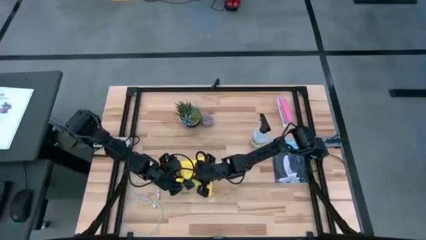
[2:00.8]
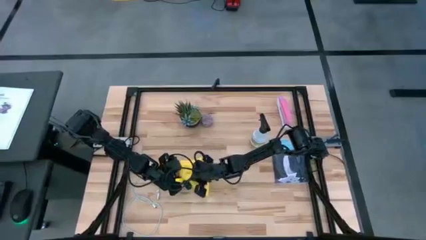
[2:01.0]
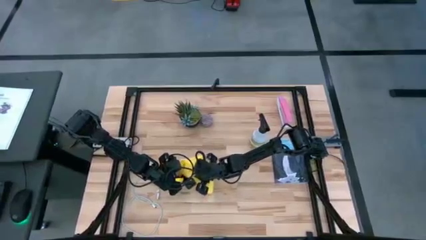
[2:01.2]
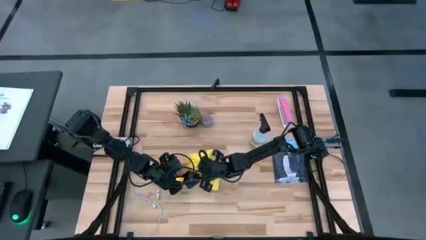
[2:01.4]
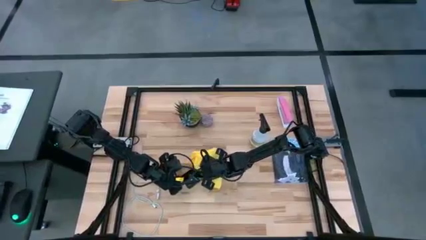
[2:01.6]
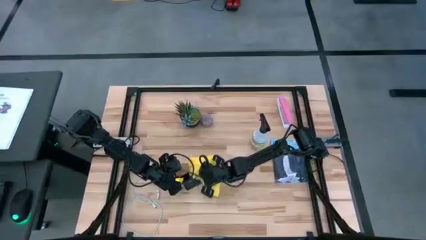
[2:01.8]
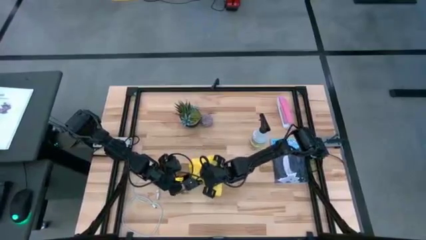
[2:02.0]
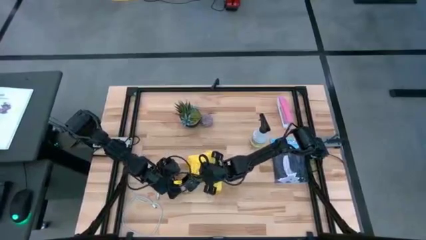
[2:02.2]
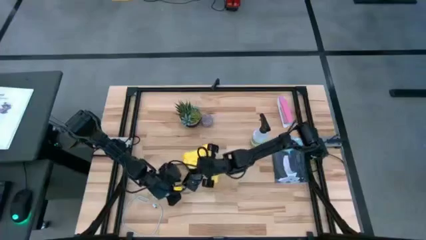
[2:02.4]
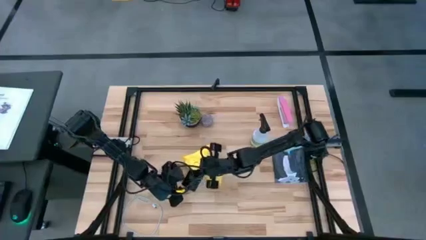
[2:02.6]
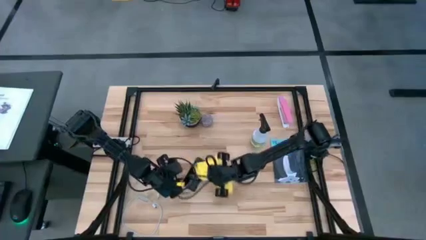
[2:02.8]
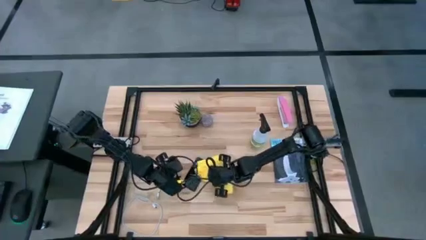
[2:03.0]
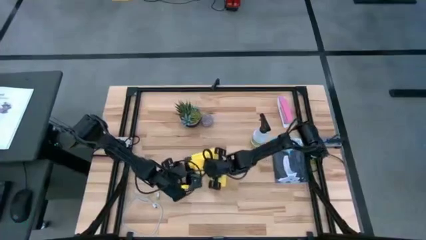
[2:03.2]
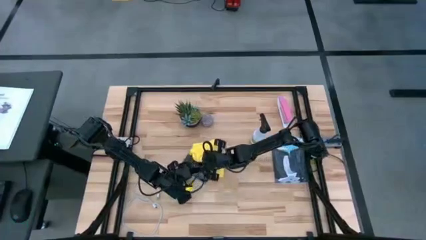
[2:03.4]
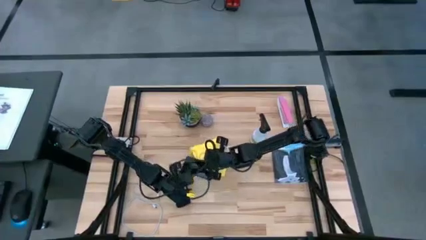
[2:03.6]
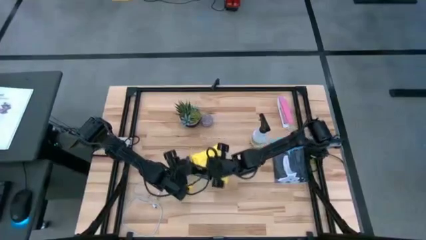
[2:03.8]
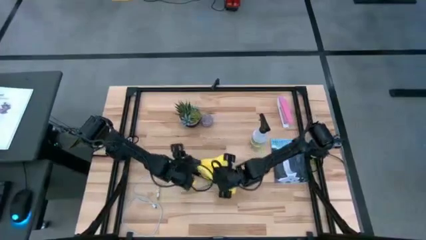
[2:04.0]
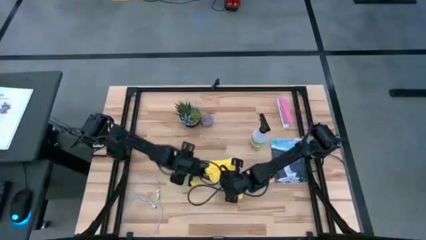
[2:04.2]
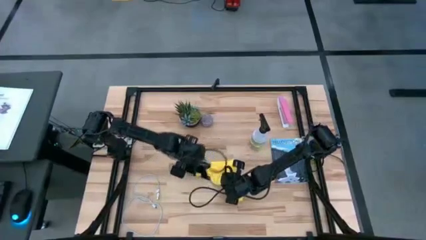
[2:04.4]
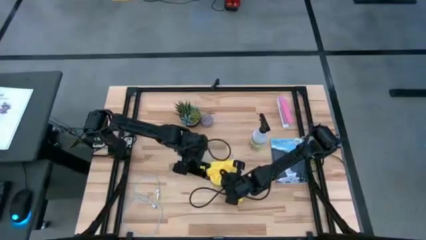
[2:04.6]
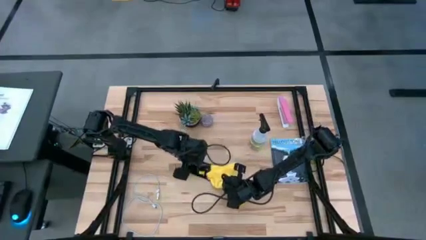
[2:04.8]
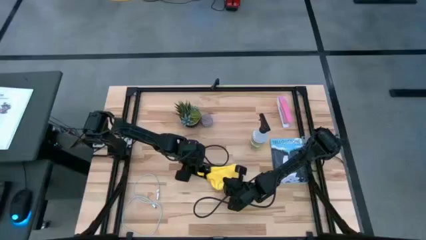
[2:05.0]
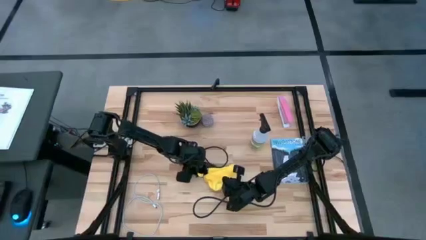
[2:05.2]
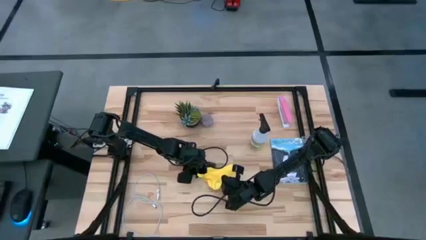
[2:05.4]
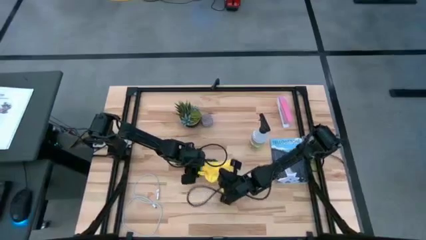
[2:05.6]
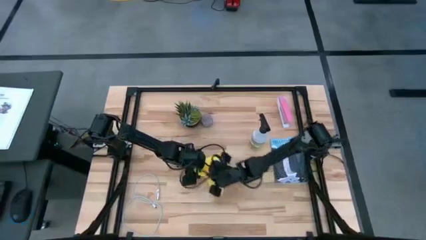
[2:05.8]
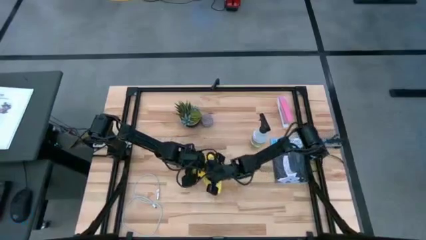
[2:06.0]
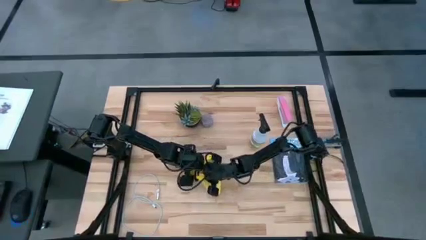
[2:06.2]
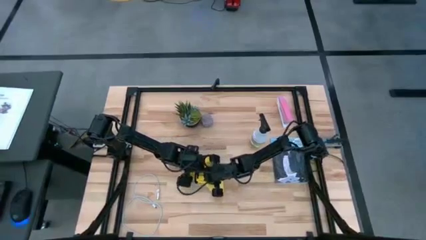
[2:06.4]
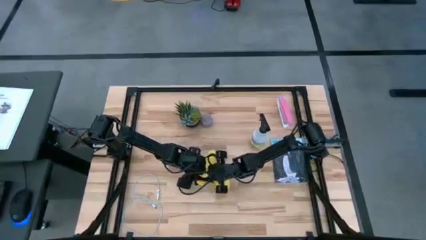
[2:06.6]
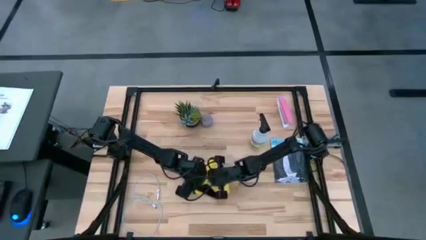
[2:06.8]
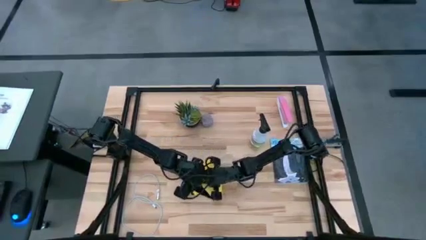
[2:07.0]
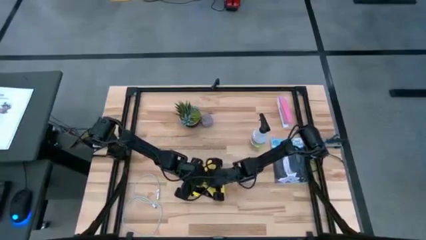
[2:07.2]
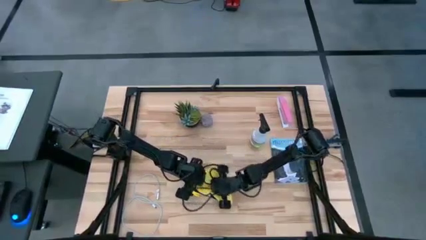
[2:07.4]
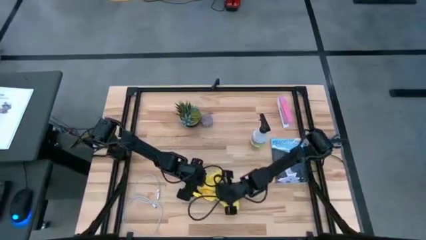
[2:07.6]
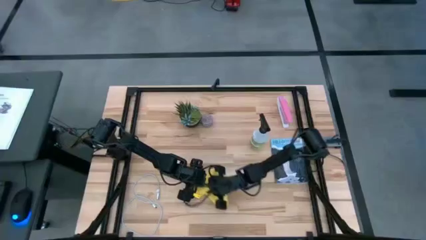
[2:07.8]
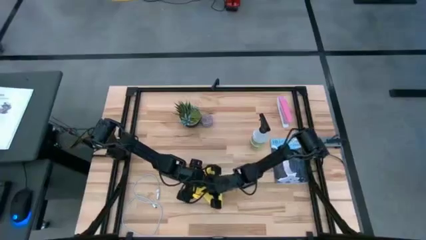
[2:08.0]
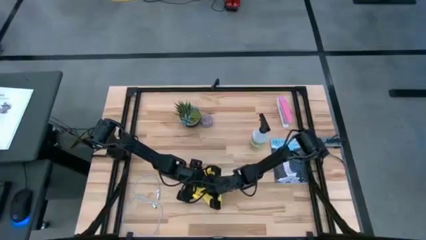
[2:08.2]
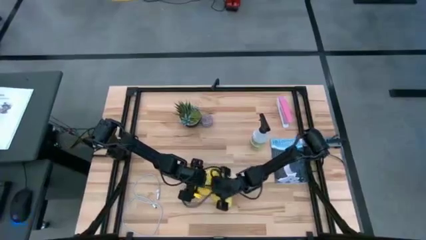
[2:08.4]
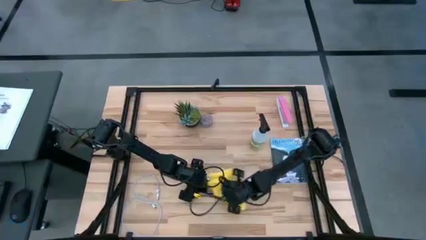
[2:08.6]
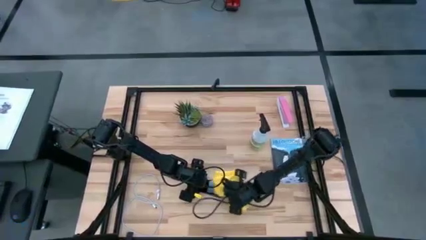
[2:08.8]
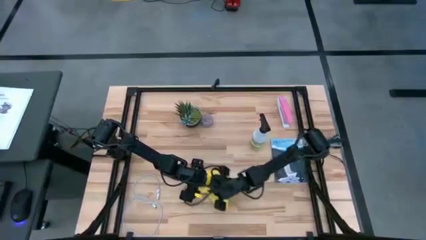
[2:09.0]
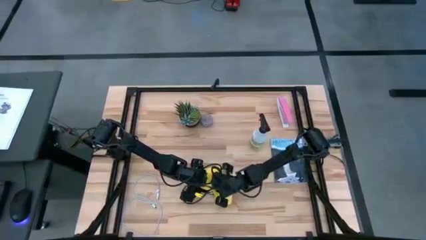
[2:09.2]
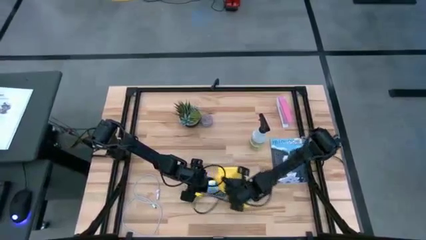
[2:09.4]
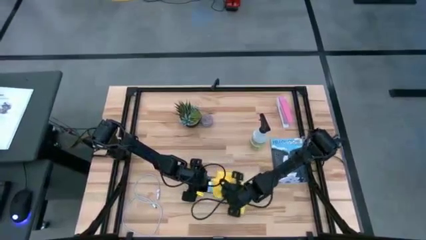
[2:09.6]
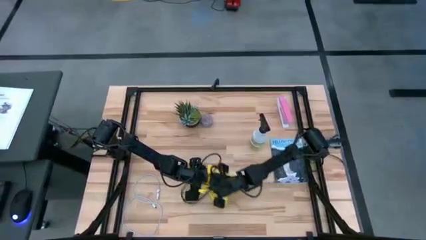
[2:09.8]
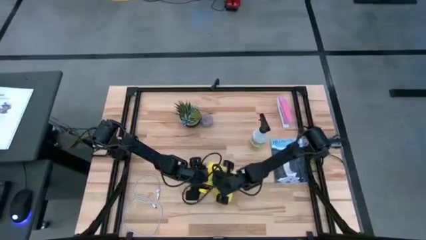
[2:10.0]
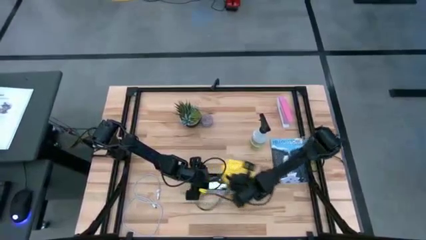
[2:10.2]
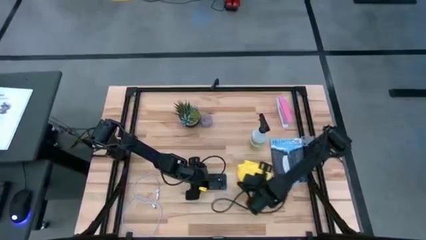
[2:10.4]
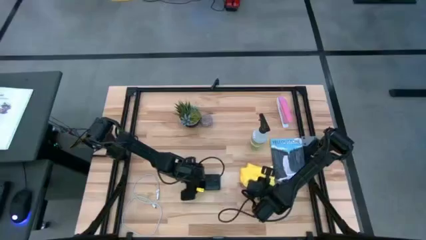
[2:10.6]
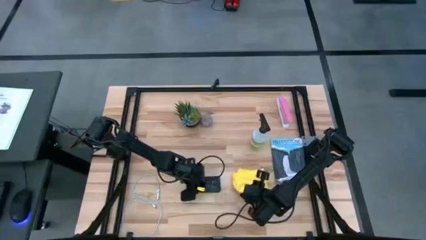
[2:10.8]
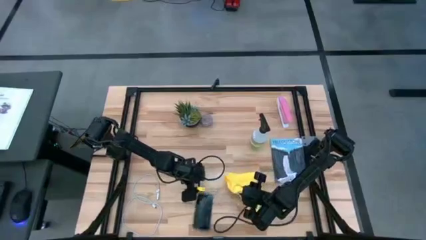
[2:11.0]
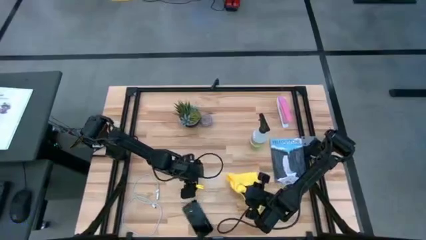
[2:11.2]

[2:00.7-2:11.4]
Task: Apply microfiber cloth
Wipe the back side of the cellphone using the yellow microfiber cloth
